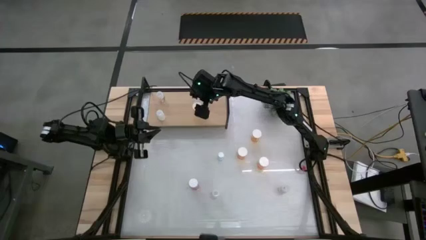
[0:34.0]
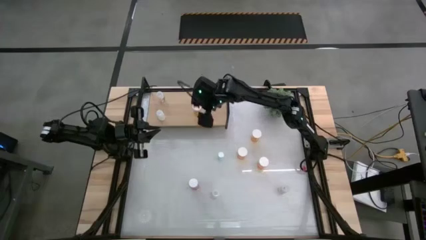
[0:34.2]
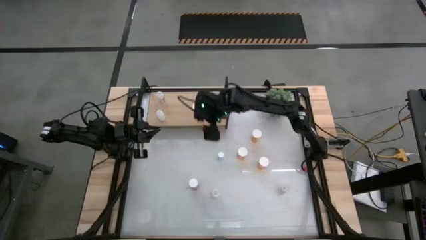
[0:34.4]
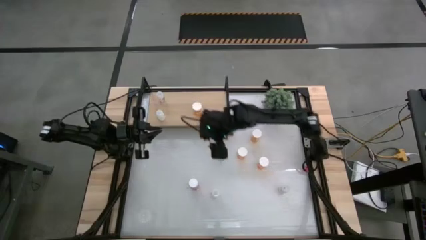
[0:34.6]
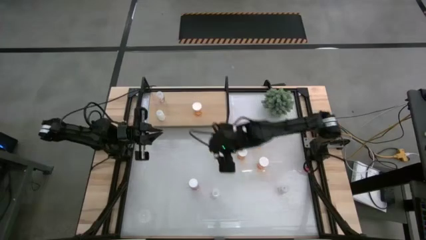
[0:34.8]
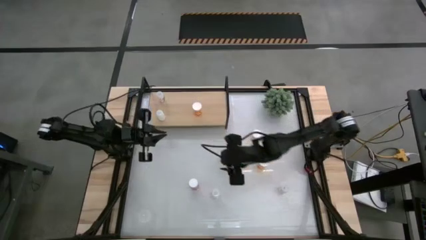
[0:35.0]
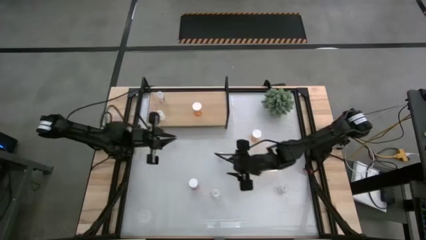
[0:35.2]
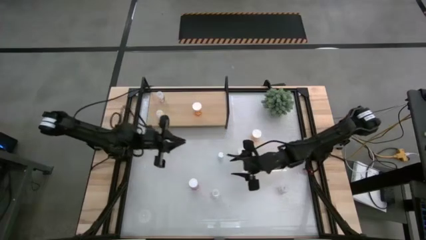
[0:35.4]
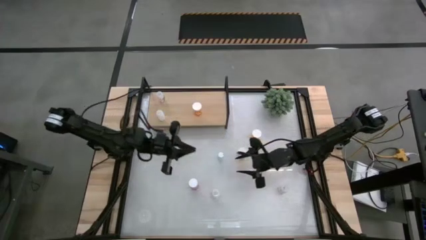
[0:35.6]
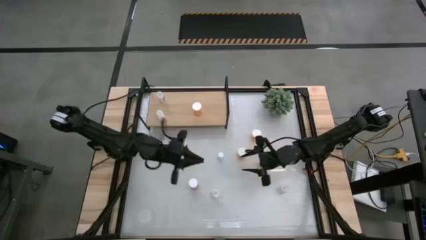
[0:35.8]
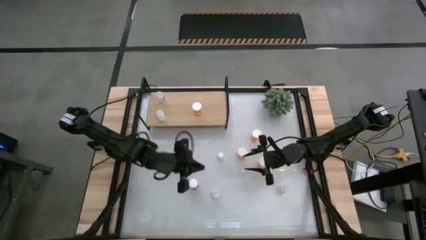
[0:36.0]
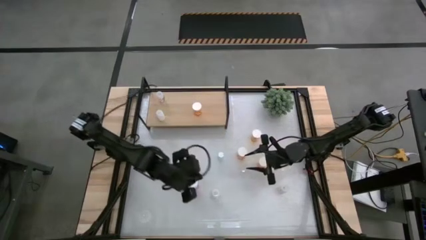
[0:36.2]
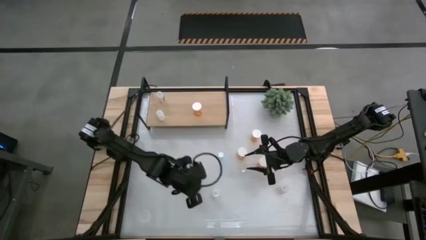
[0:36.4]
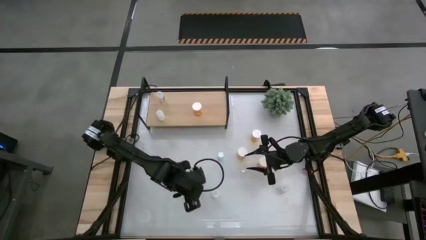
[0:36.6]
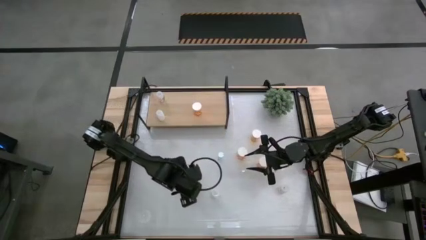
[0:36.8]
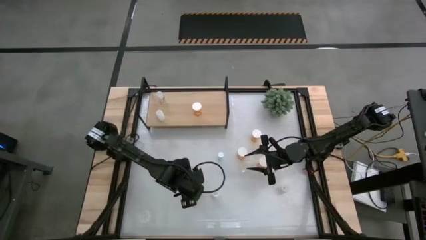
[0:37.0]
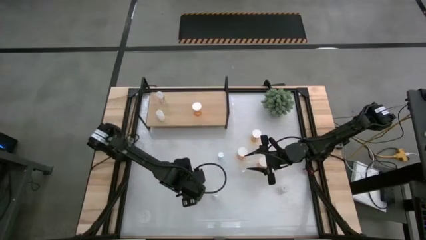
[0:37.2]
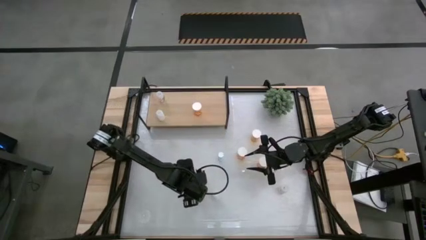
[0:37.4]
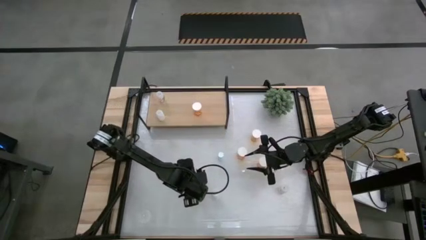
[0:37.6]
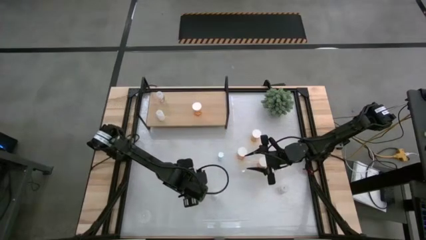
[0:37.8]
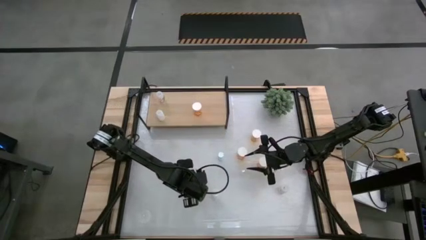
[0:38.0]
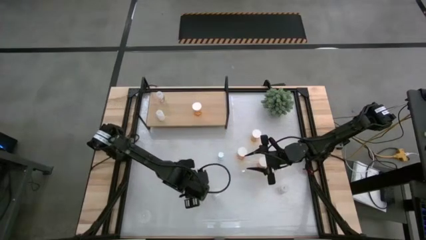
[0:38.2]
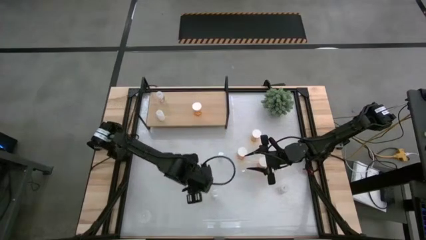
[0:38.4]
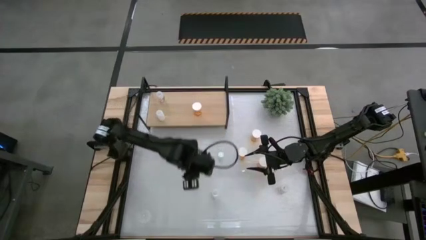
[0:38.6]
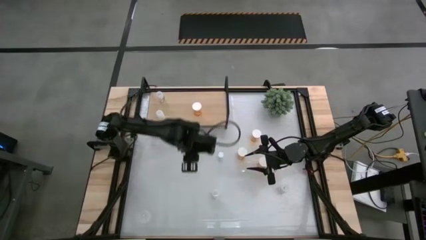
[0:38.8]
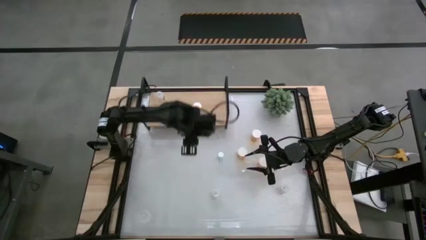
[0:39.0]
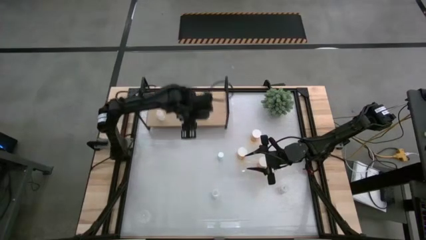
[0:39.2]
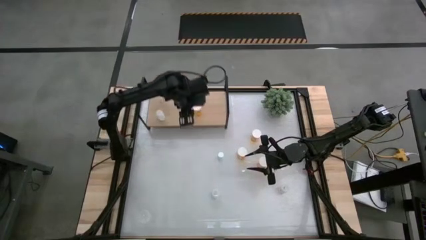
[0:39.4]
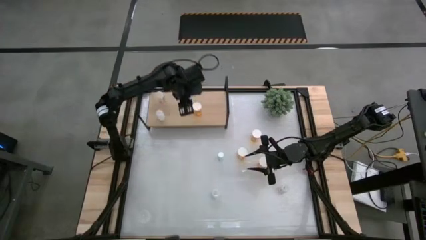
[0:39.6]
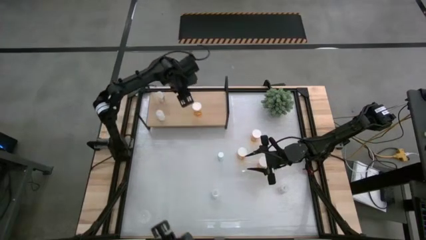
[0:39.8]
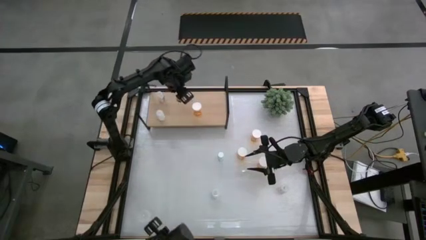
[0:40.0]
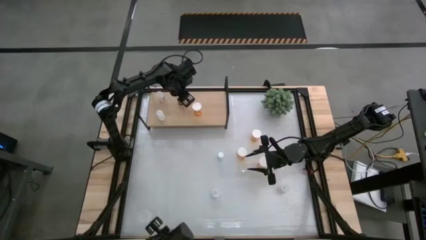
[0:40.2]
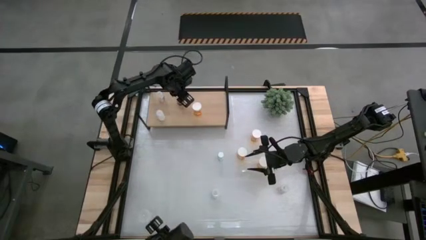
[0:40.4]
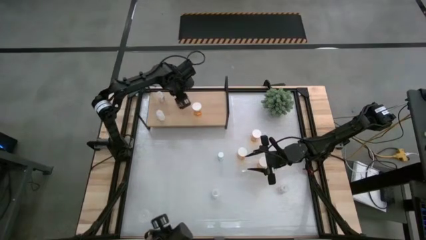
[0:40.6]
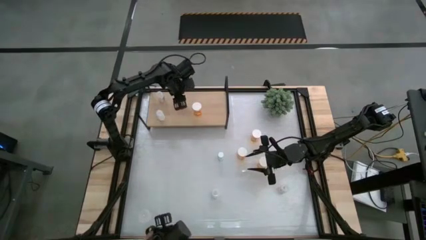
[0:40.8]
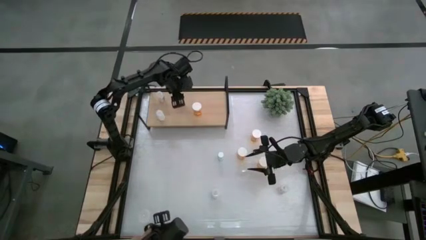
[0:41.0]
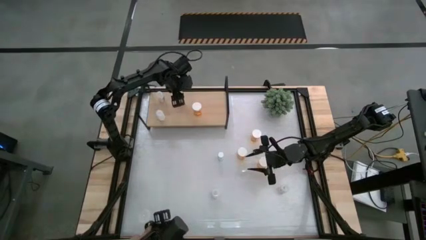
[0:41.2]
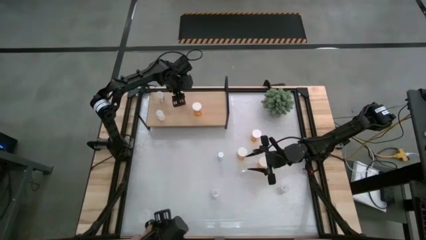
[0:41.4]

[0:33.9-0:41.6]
Task: Pick and place medicine bottles onto shelf by color
Put the pink medicine bottle on the shelf

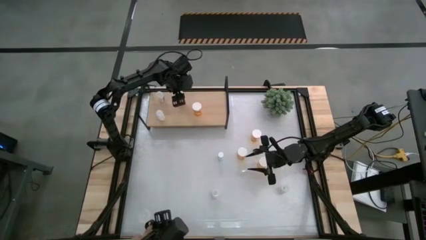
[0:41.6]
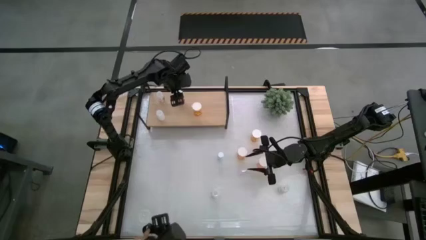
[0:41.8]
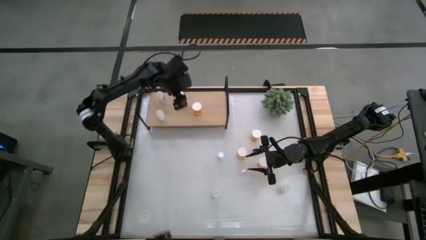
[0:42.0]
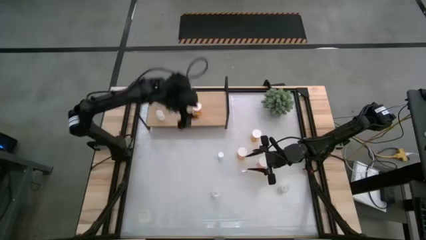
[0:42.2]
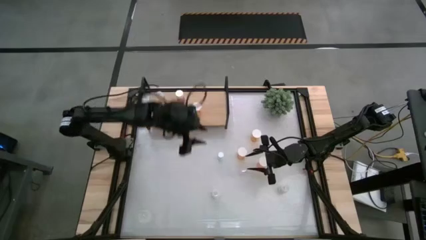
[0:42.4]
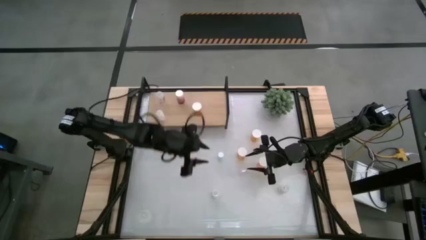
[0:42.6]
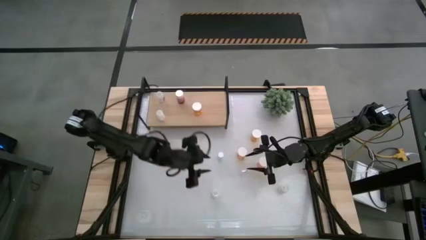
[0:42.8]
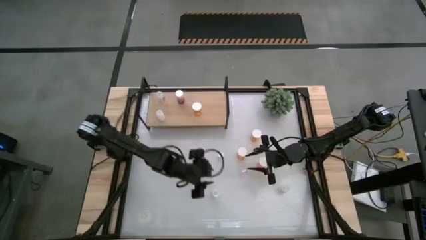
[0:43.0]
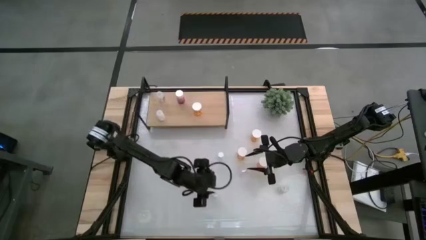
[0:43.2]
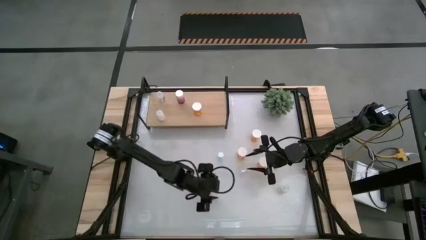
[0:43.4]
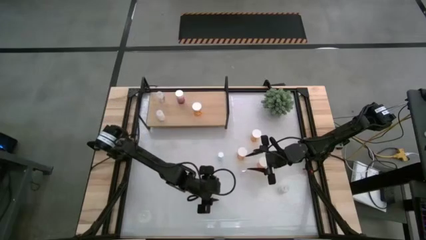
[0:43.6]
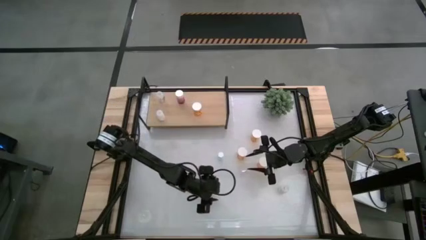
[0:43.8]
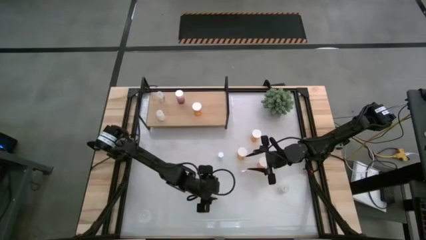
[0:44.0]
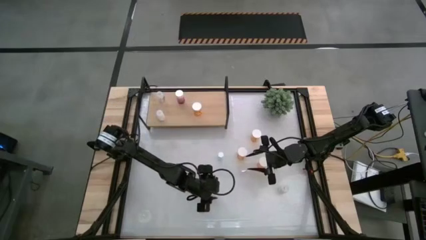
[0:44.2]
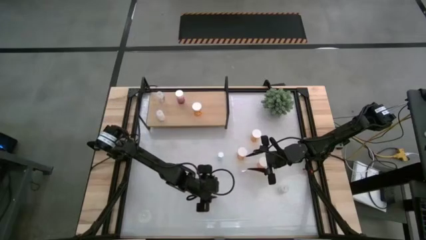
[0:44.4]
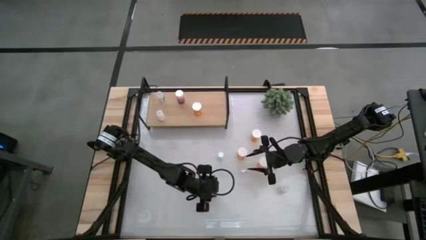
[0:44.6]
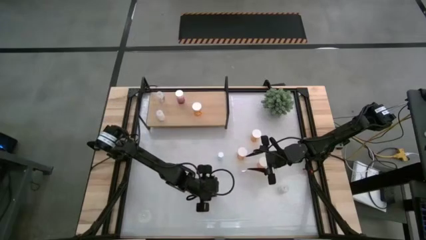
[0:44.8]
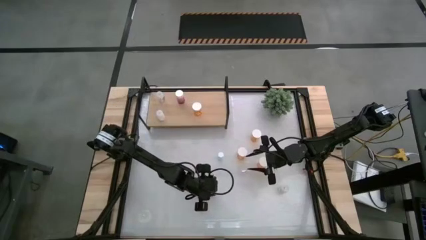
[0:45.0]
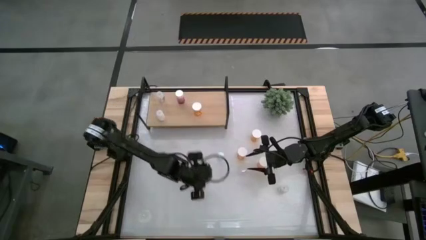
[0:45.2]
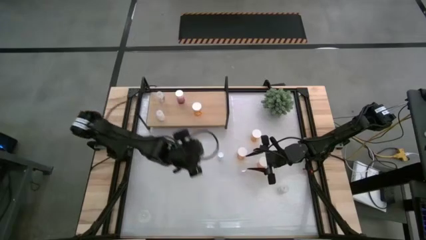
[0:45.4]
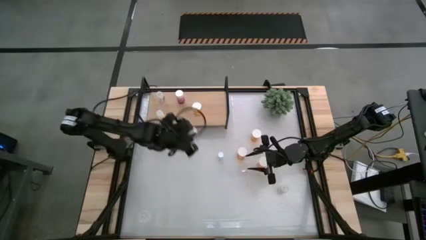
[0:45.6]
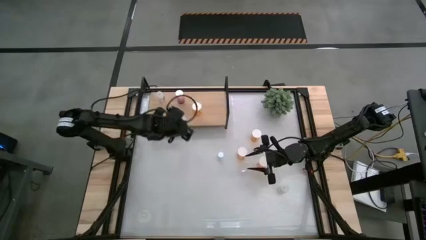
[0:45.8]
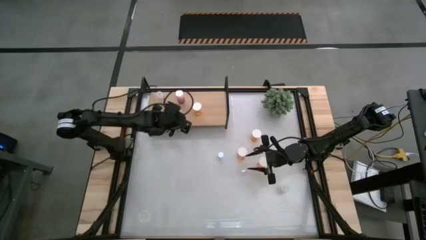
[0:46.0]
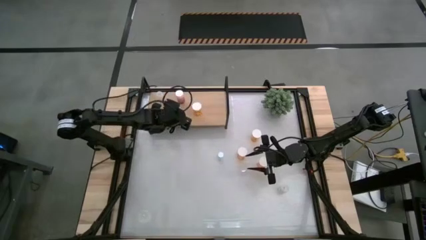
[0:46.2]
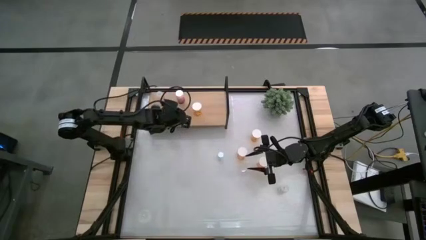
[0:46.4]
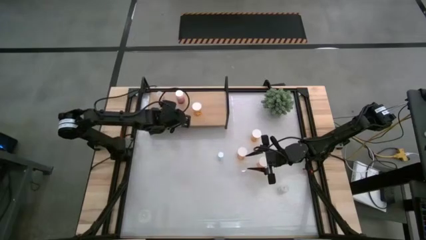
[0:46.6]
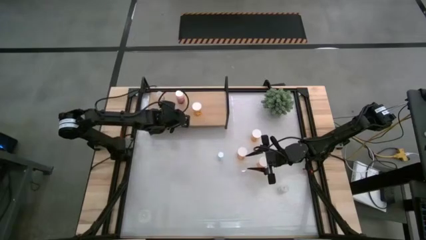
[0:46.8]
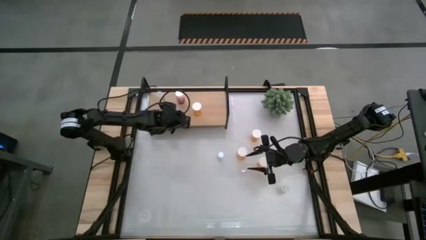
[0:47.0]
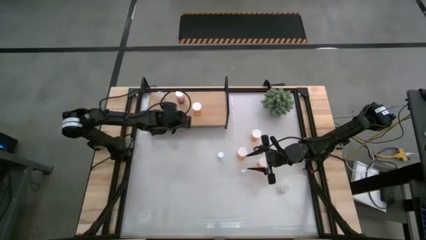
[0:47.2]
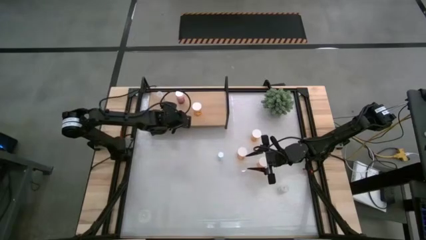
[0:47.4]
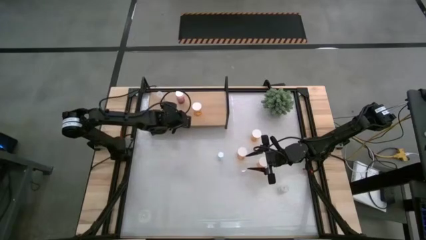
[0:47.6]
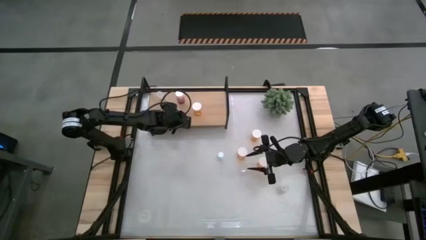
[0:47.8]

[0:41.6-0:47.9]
Put the white pill bottle on the shelf

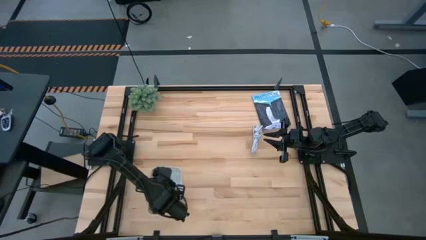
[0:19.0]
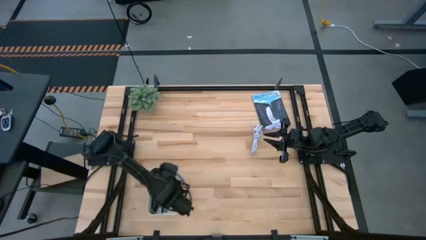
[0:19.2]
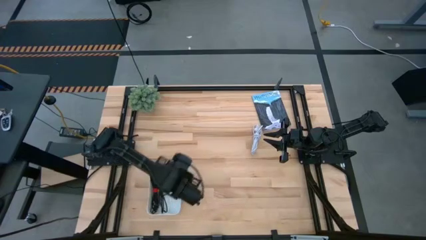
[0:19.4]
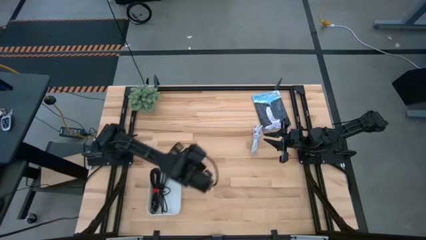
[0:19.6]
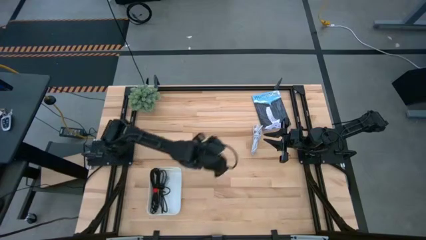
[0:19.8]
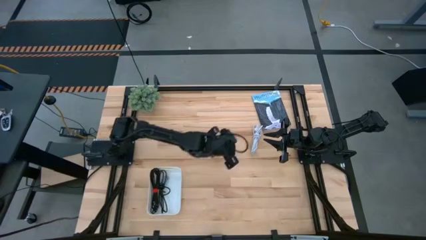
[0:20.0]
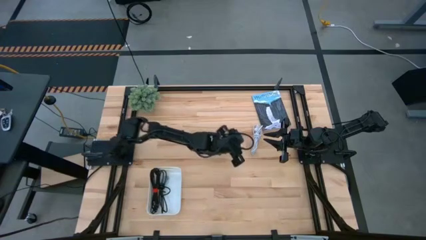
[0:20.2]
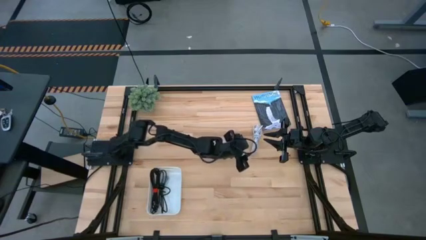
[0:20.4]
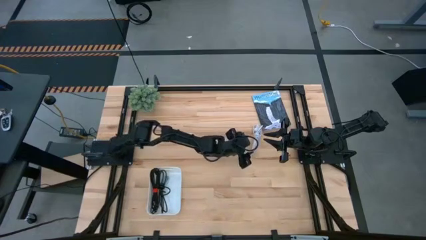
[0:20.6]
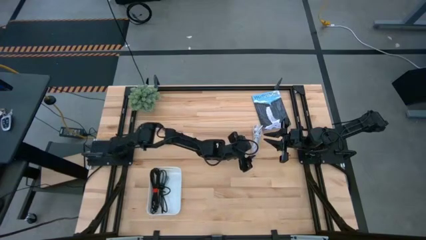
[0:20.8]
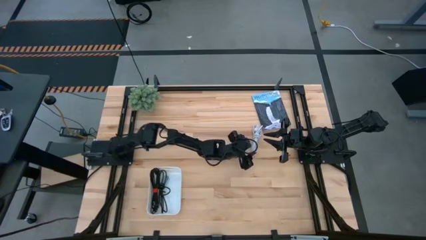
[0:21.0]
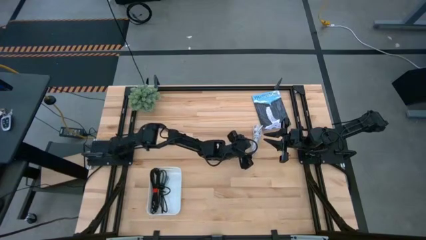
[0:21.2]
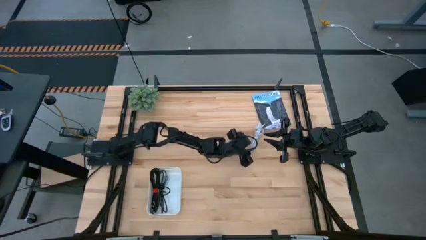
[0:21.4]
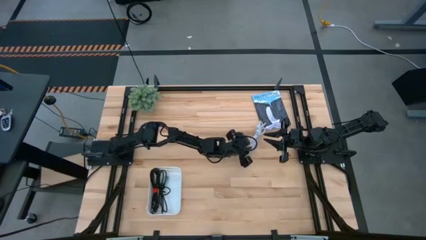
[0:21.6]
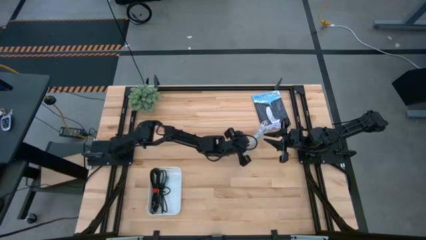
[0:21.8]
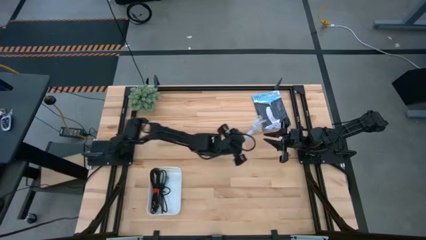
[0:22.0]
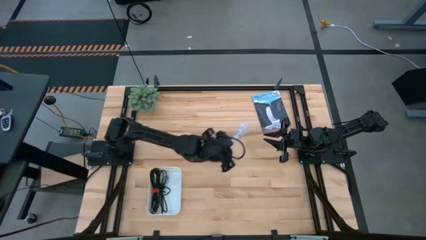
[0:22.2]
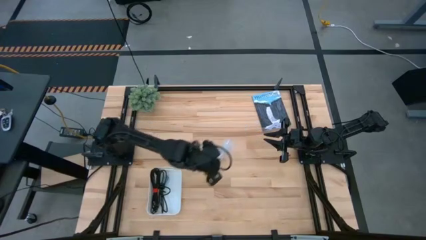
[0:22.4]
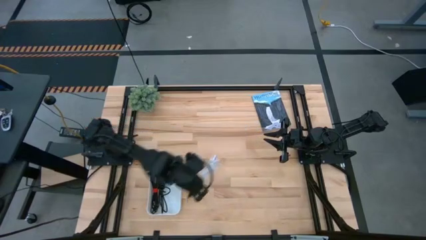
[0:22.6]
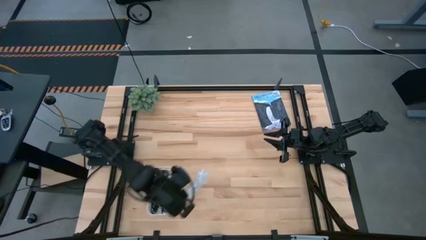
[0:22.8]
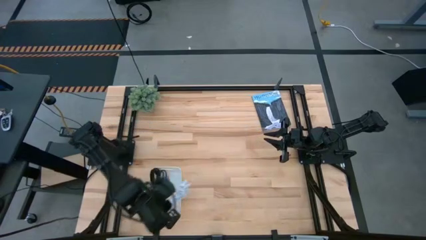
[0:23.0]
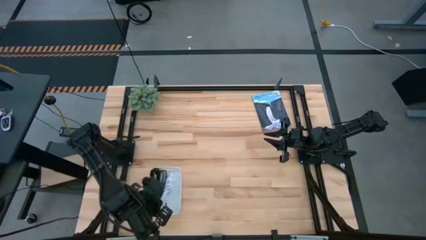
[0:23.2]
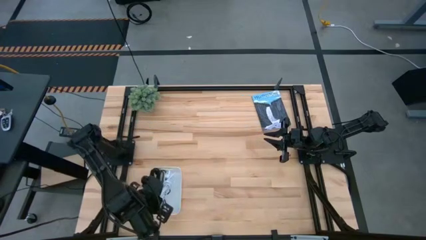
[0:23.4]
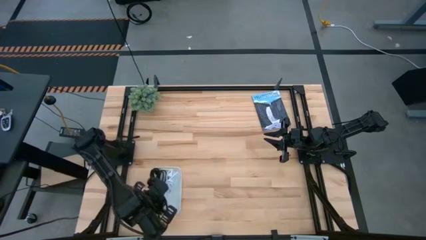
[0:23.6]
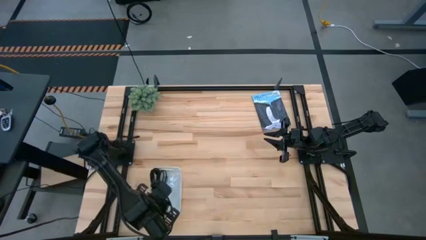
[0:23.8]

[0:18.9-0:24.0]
Task: Pick and place USB-C Cables
Put the white USB cable into the white bin
